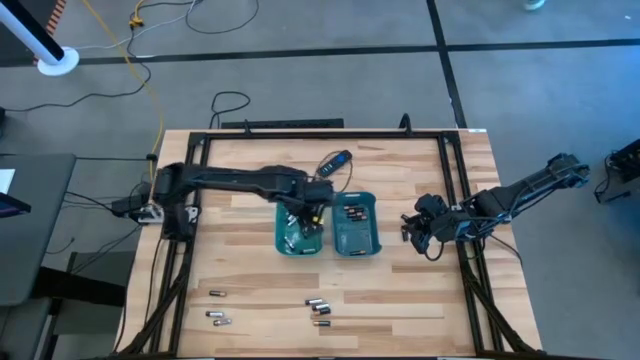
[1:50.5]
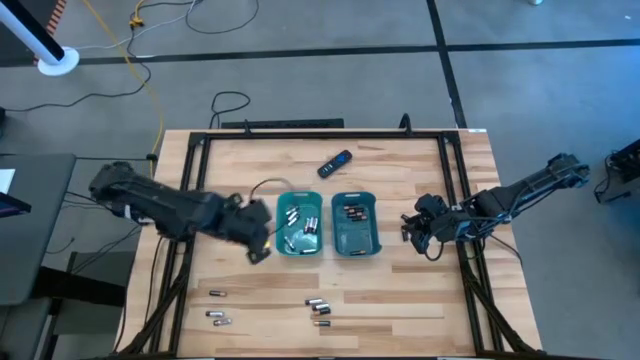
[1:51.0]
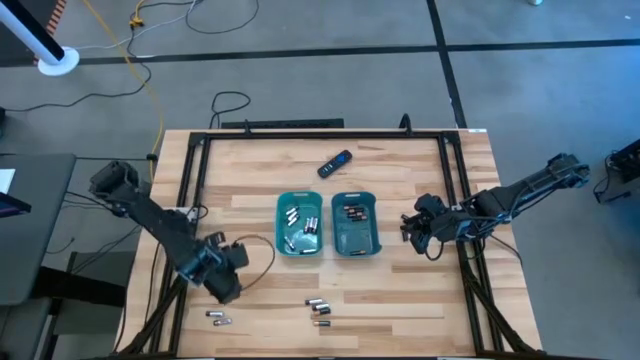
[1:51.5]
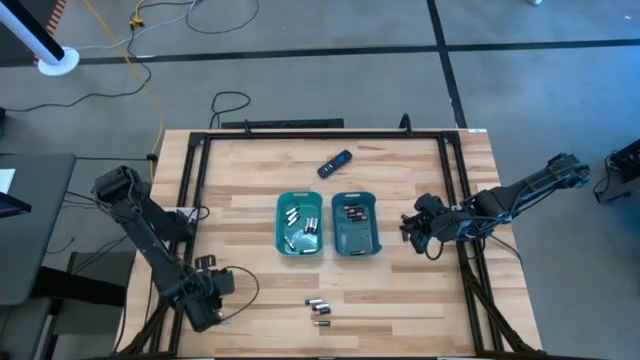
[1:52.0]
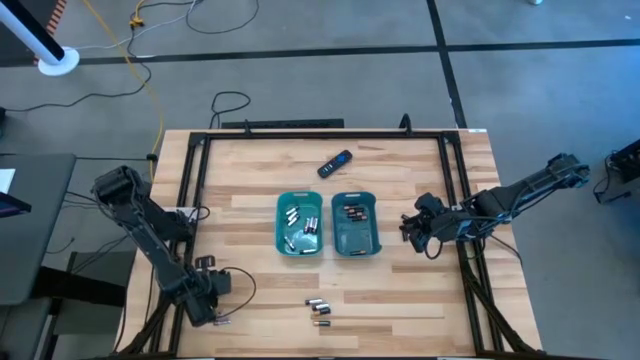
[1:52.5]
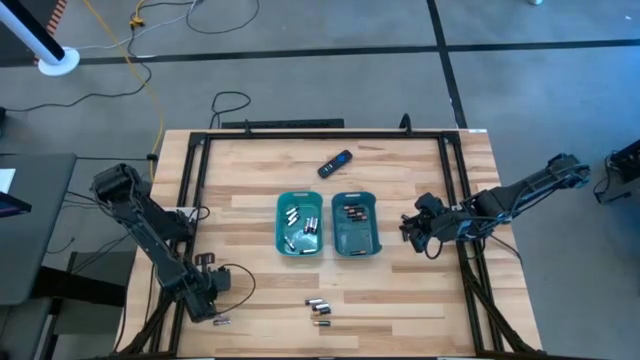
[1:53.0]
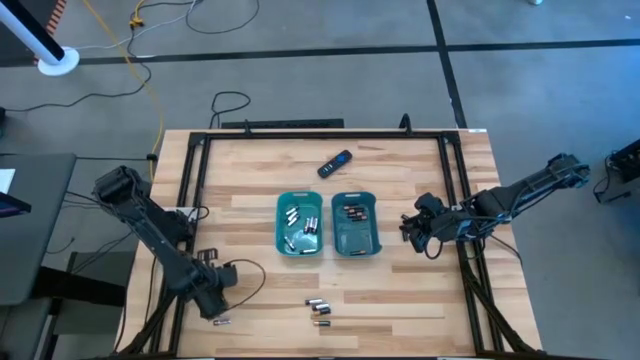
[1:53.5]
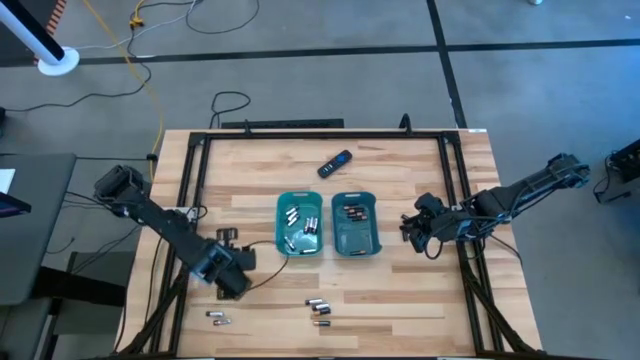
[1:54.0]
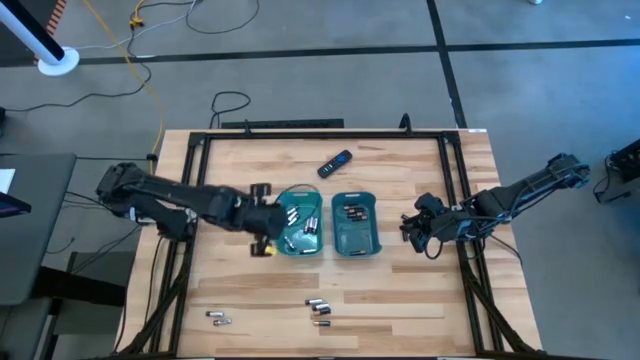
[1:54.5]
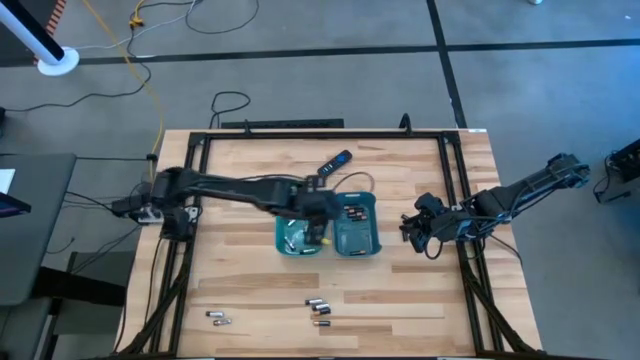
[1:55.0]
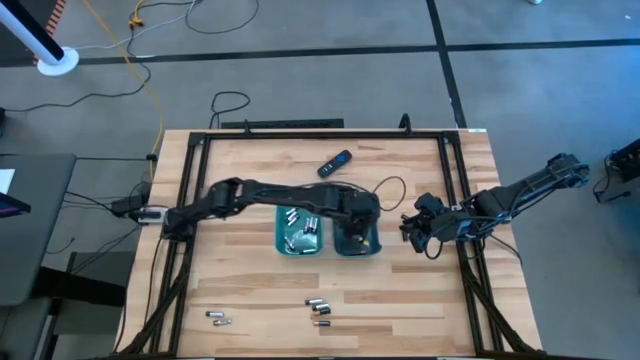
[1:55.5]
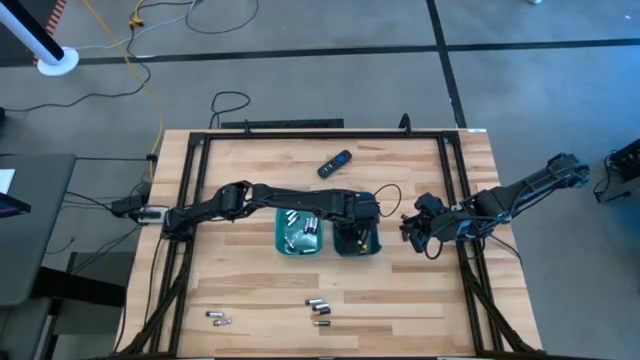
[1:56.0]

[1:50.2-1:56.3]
Task: Sort batteries
Put the copper and black battery into the blue bin

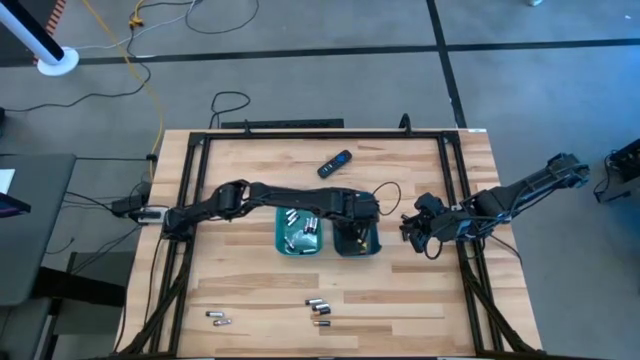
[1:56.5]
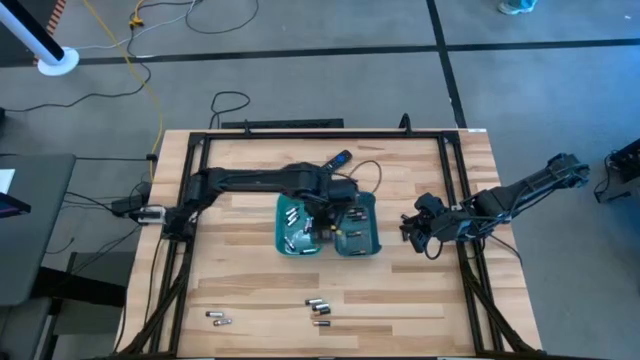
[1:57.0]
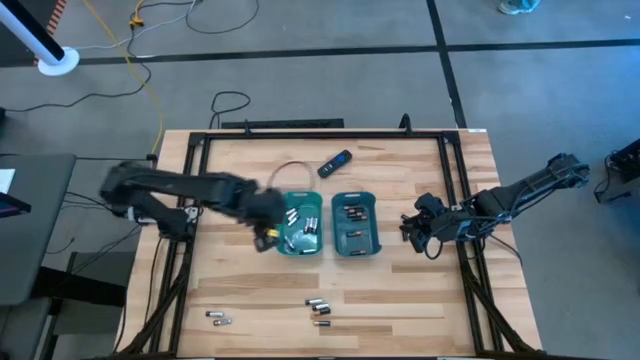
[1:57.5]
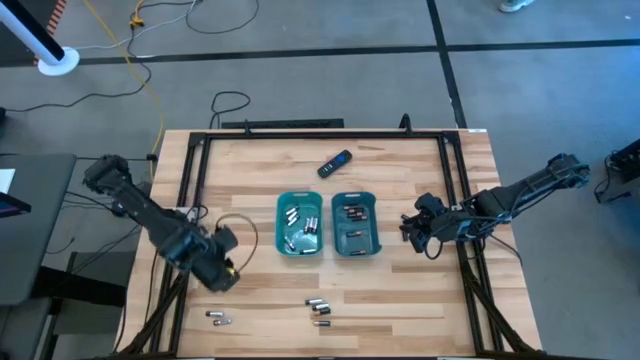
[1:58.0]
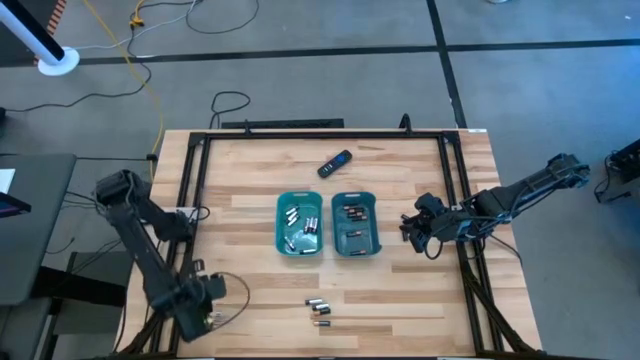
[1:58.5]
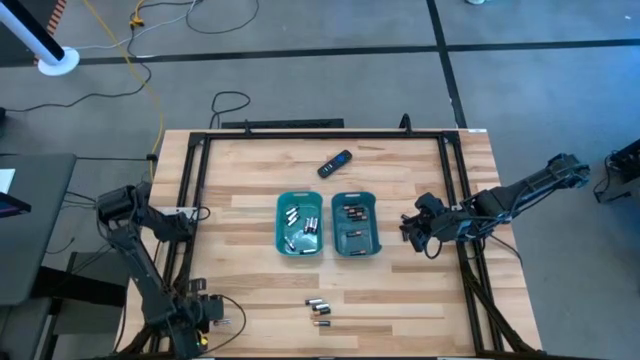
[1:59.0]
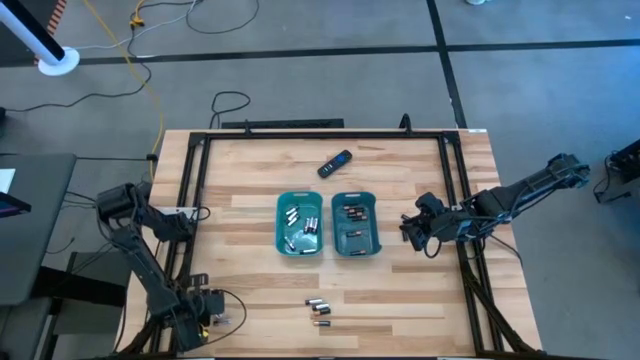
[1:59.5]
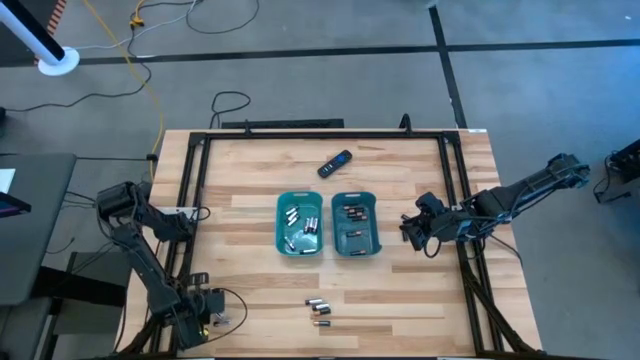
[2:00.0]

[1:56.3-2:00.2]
Put the silver and black battery into the green bin

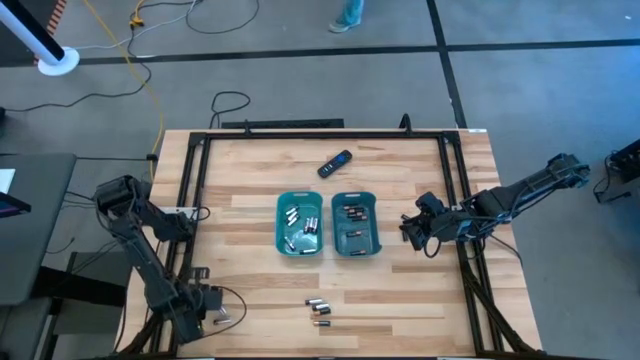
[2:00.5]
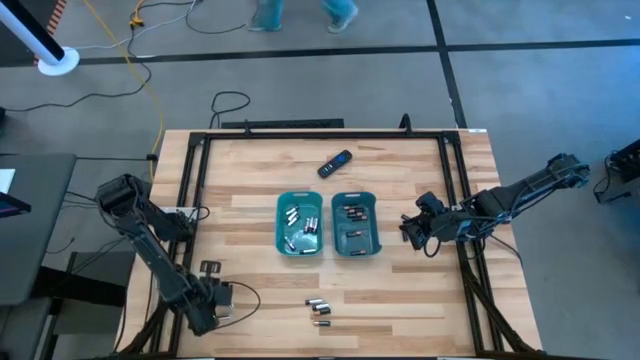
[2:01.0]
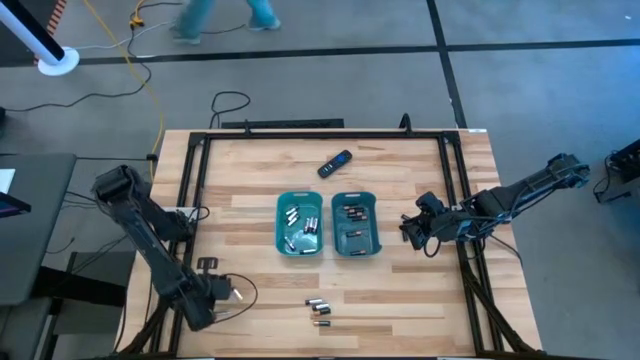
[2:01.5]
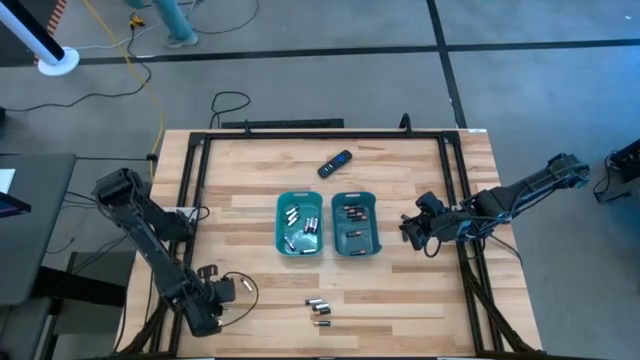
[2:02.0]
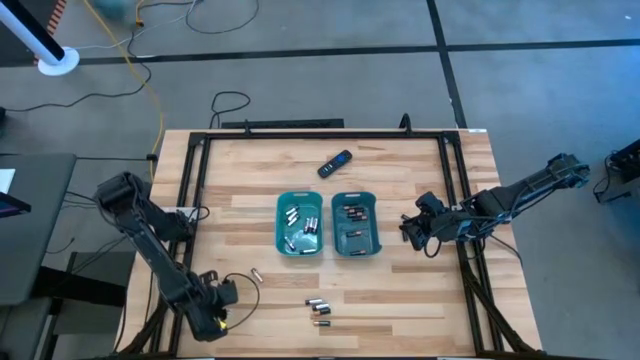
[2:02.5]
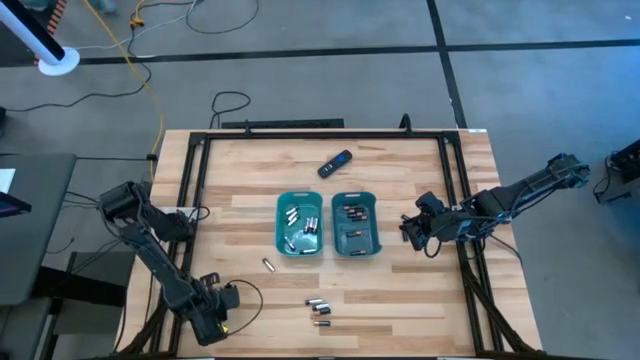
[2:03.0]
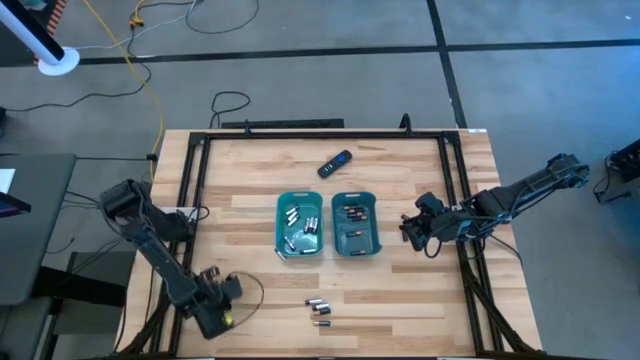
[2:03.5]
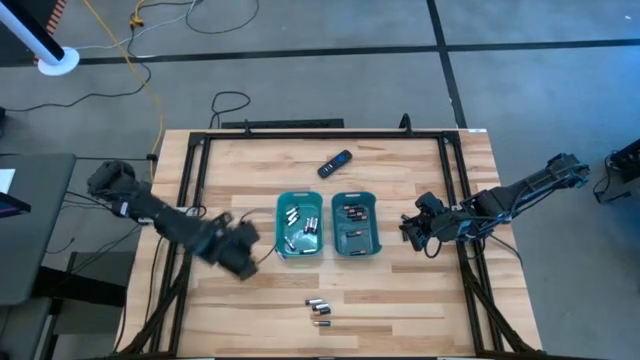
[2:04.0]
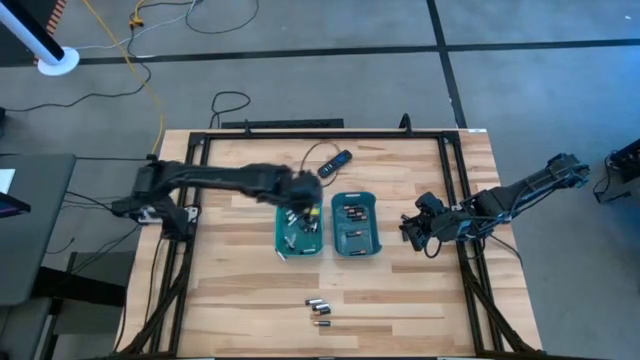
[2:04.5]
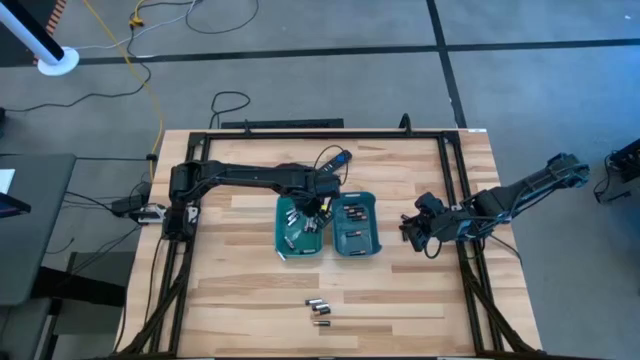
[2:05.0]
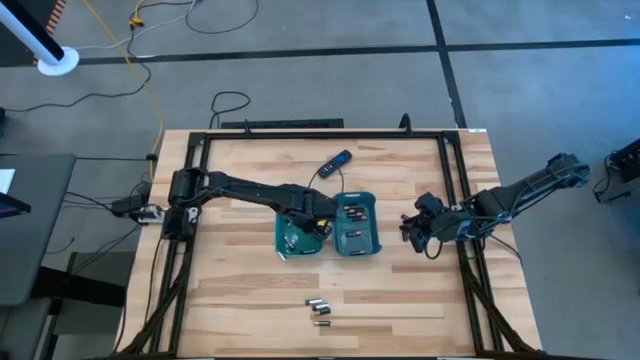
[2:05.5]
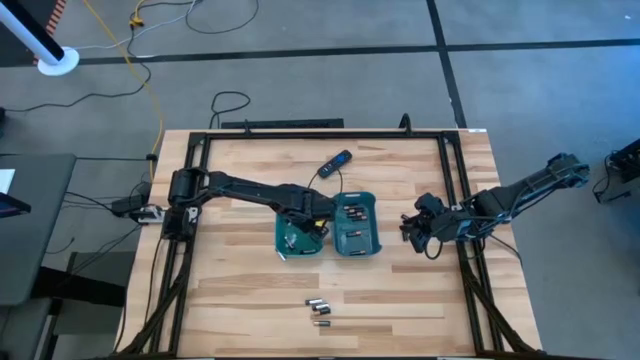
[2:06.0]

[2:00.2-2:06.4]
Put the silver and black battery into the green bin

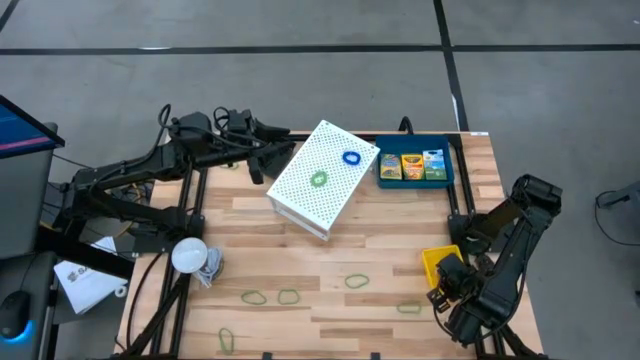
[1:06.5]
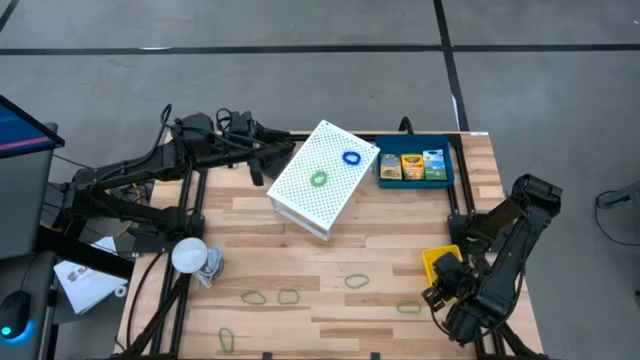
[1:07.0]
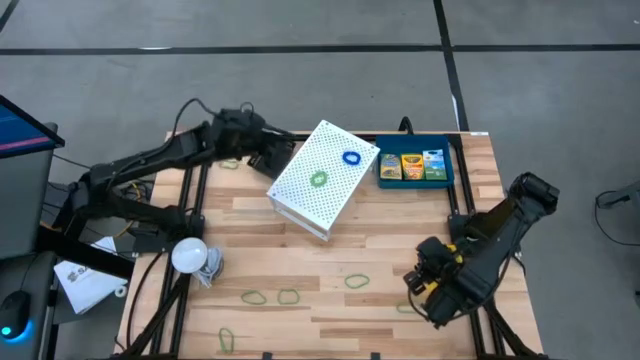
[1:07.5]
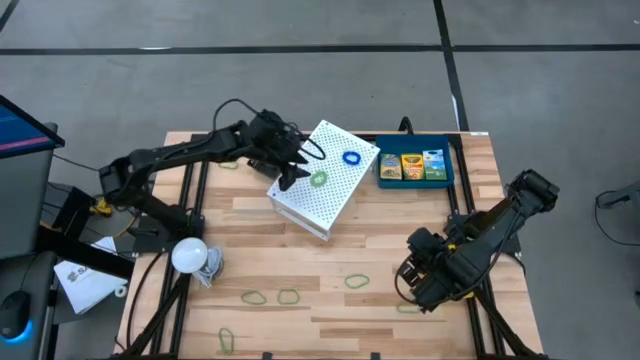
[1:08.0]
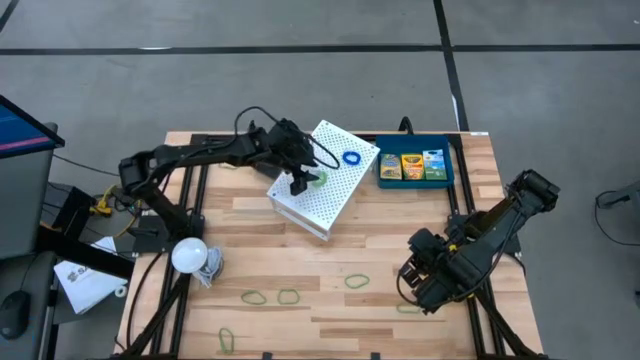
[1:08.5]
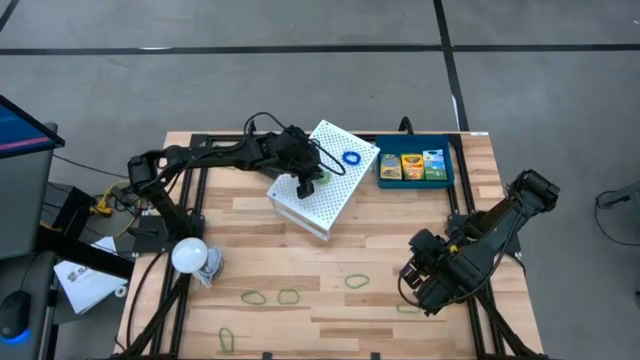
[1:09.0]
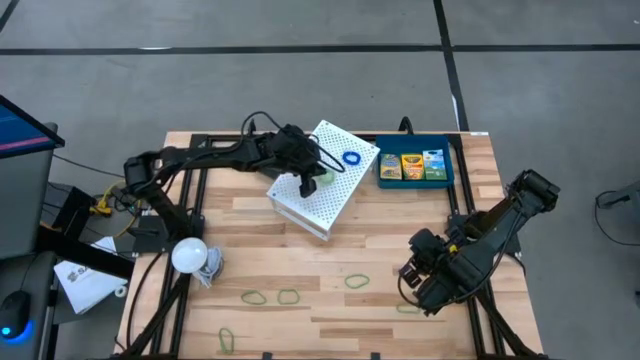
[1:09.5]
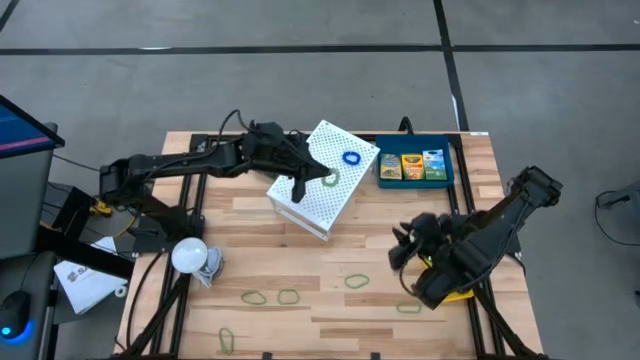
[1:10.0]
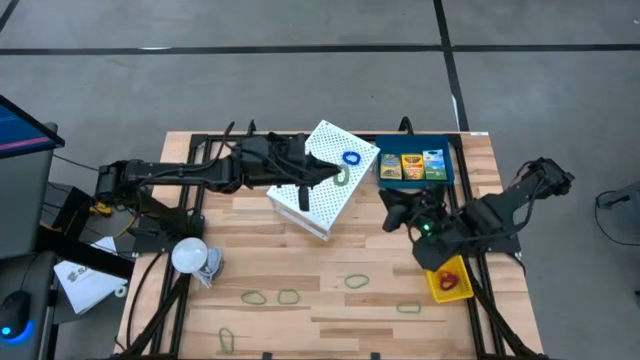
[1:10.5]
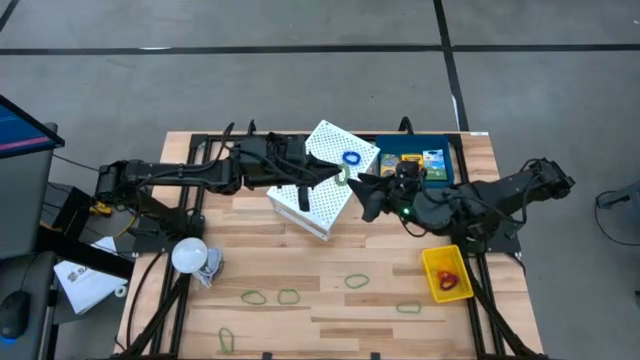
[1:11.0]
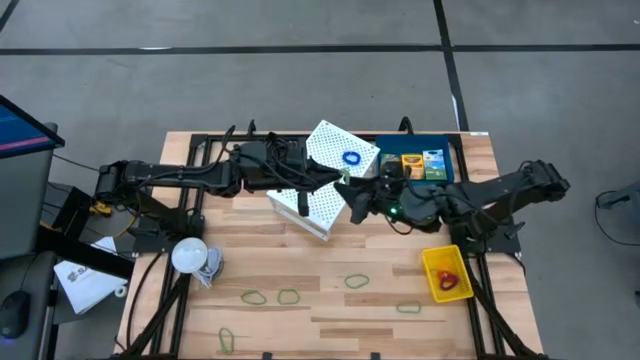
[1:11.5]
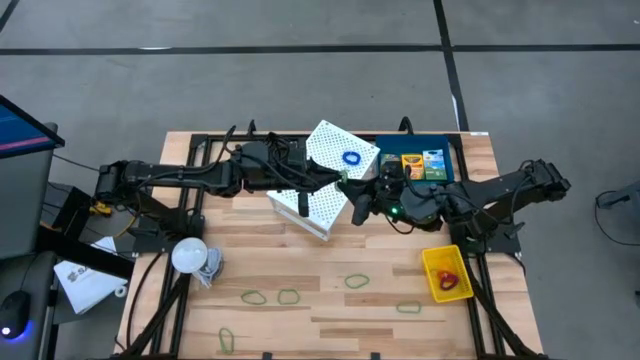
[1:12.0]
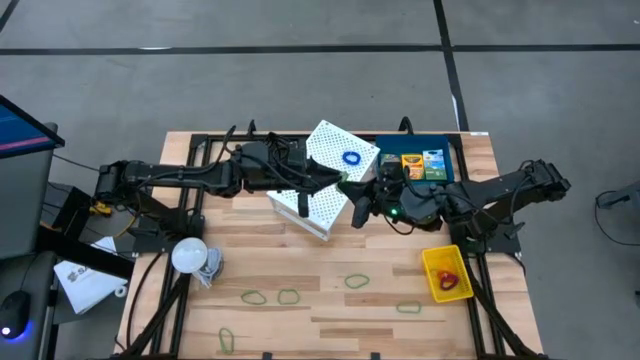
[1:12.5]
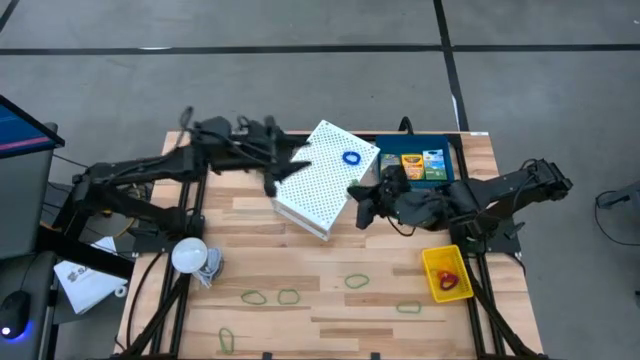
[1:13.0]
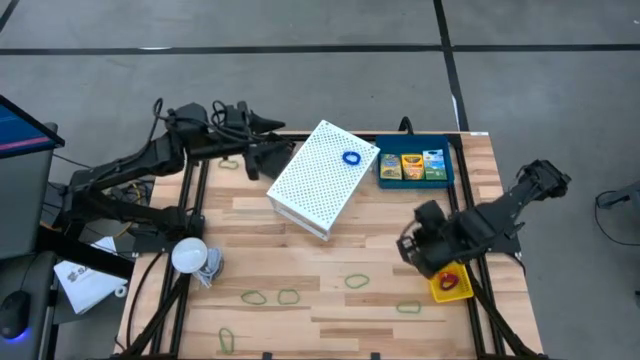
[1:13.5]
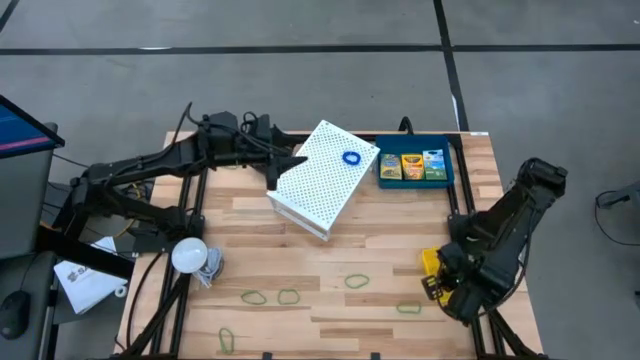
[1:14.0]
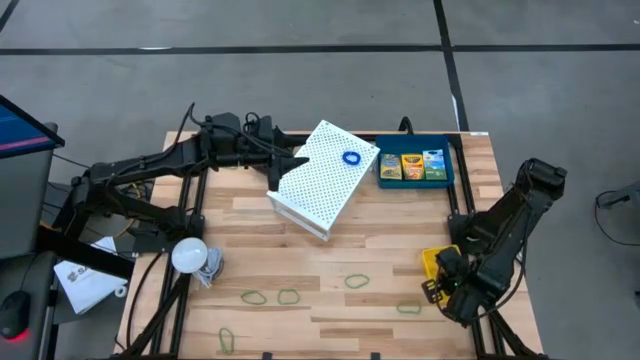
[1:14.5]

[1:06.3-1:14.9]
Task: Pick & Place Office Desk Supplies
Put the green spring keychain into the yellow bin
